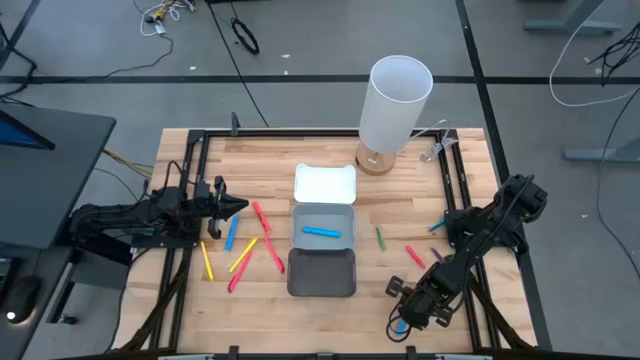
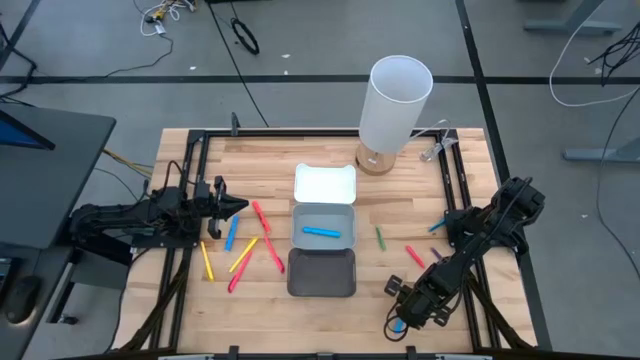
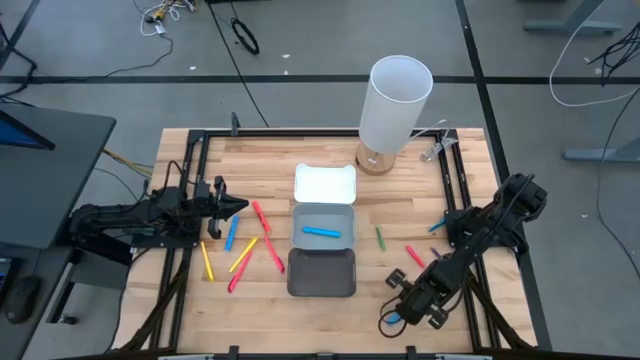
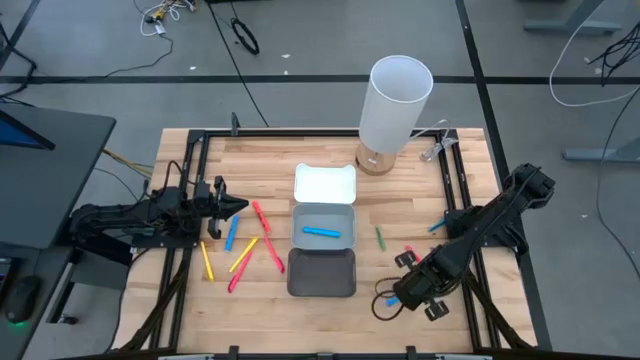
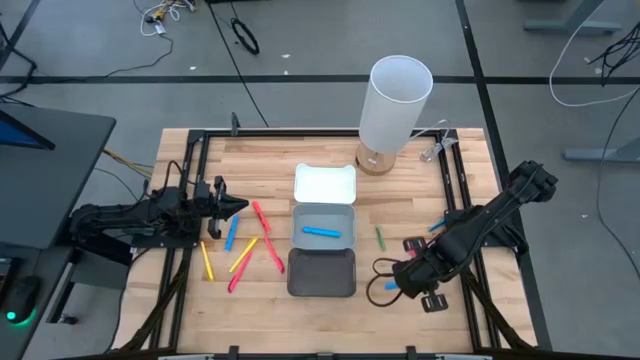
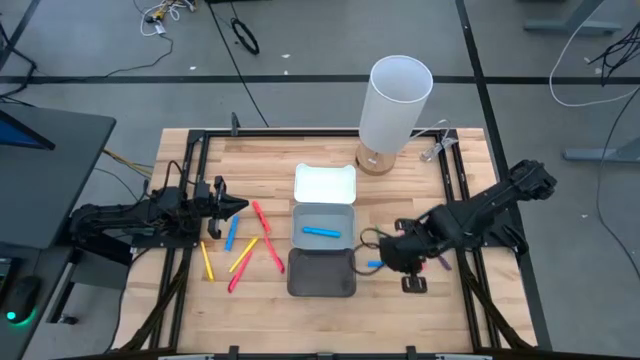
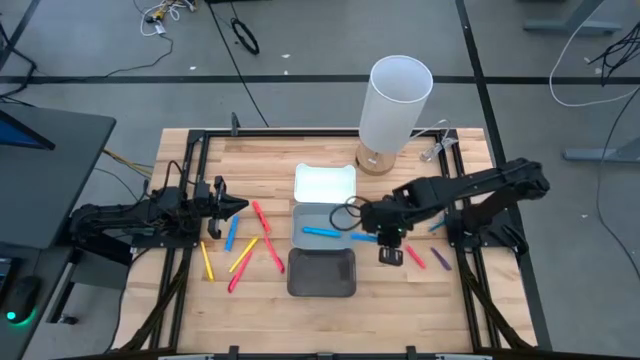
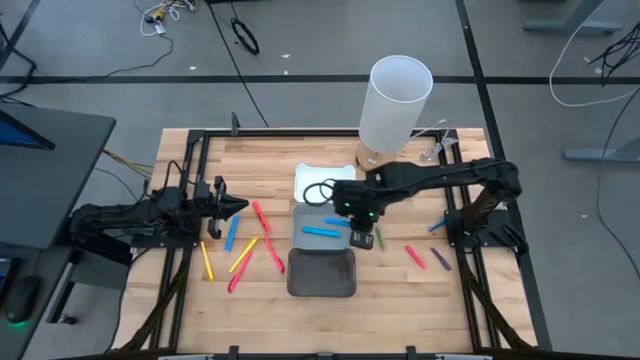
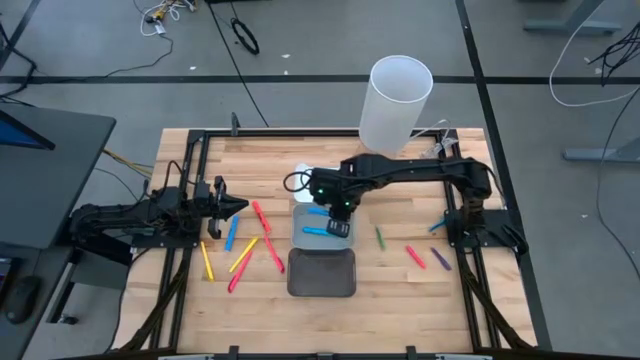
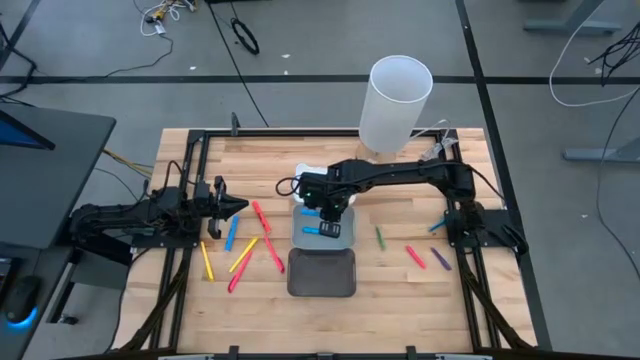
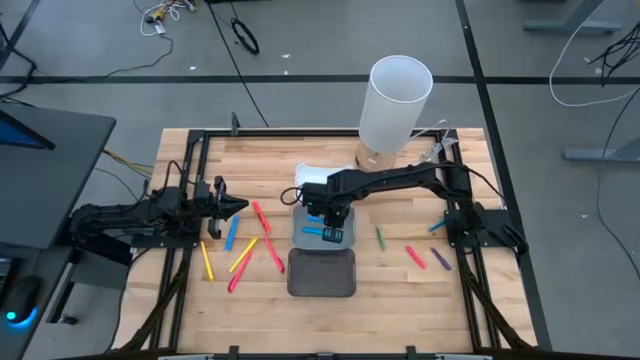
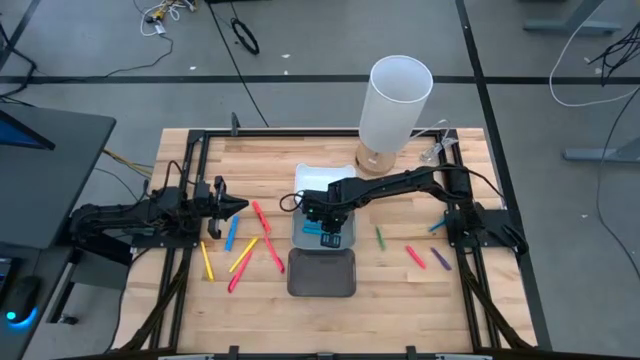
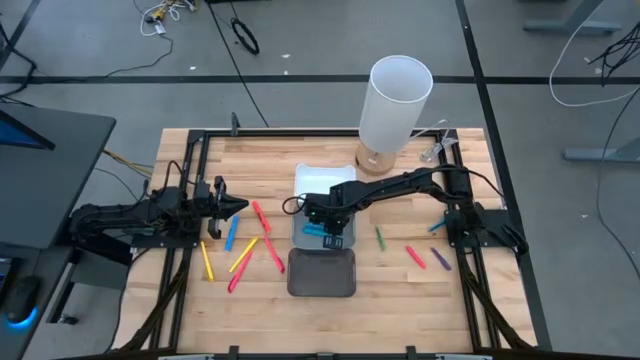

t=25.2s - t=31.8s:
Task: Pick & Place Markers
Put the light blue highlighter pen into the gray bin

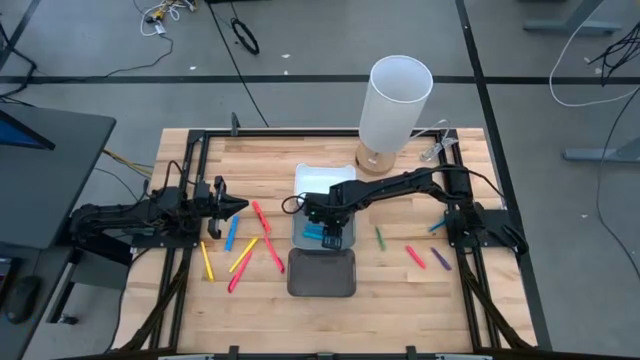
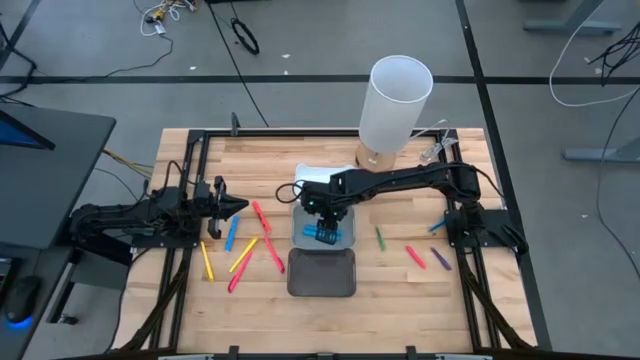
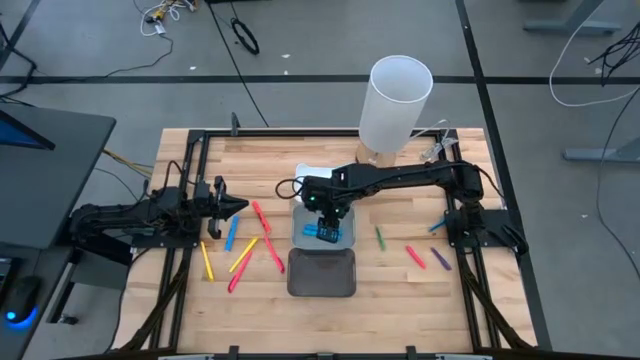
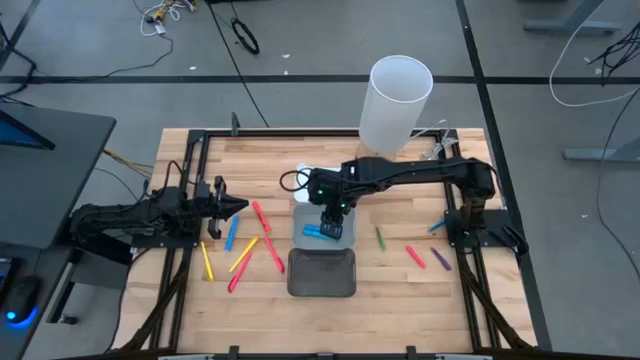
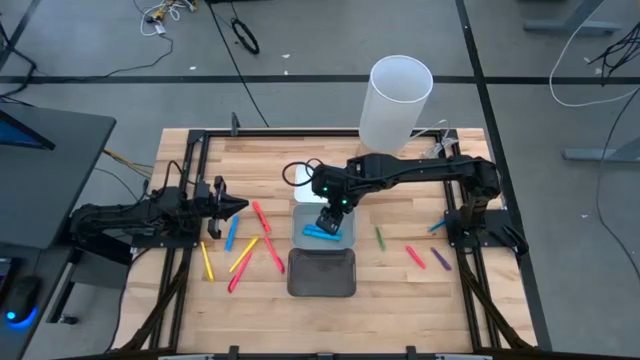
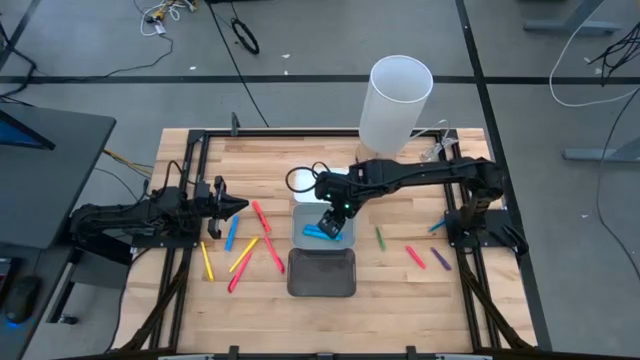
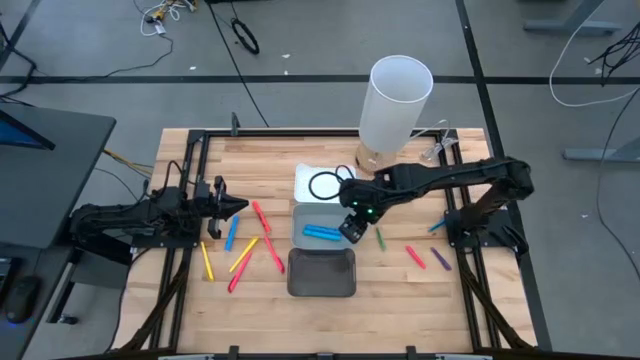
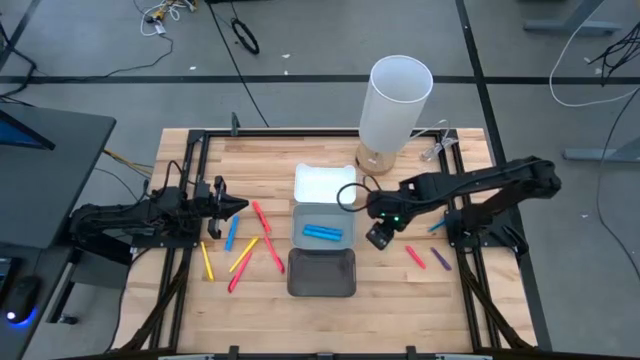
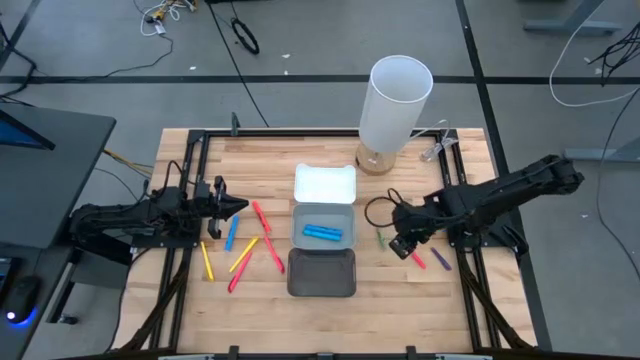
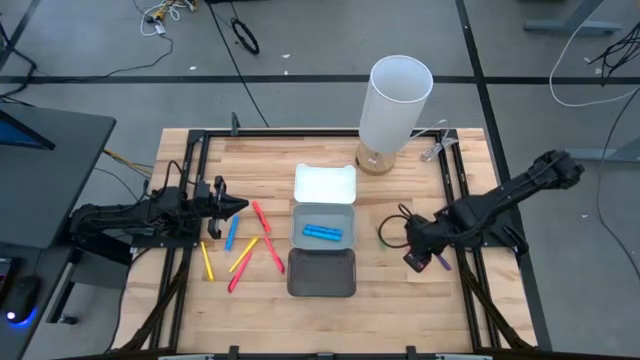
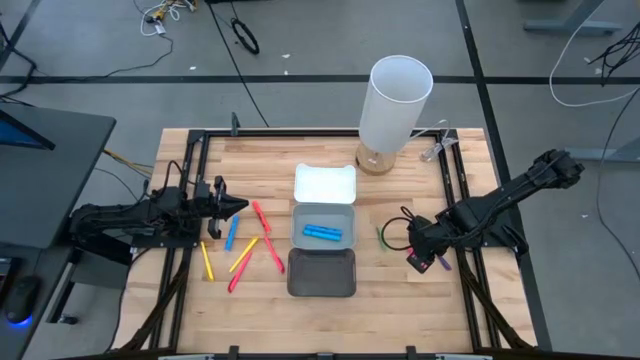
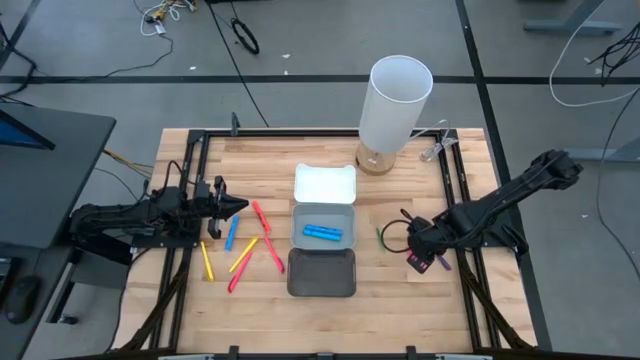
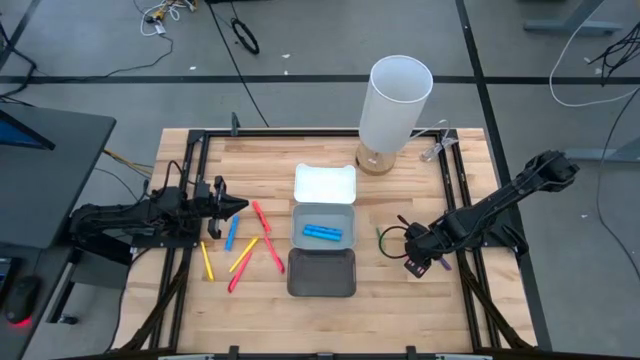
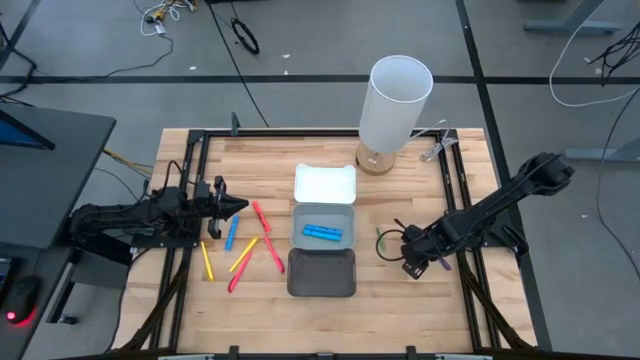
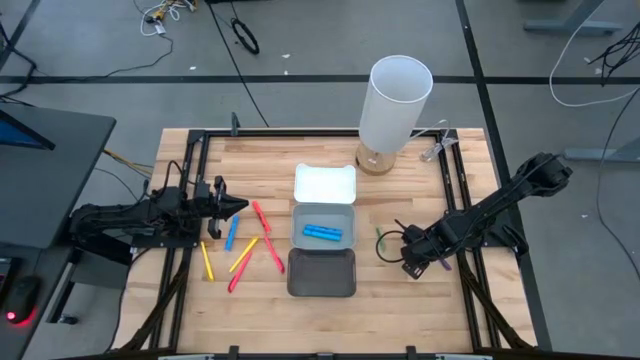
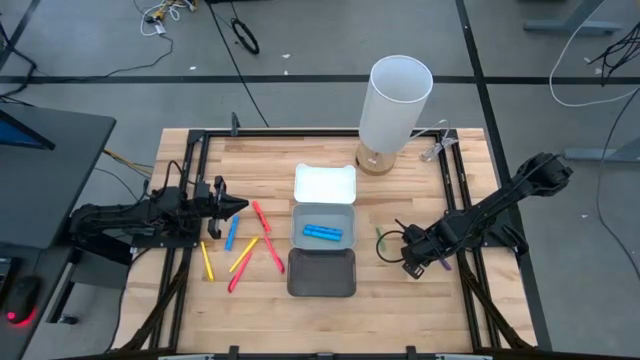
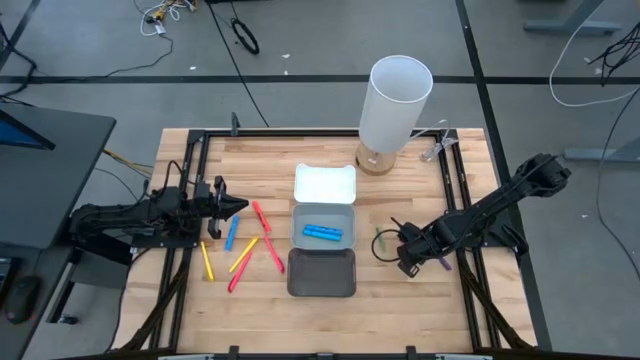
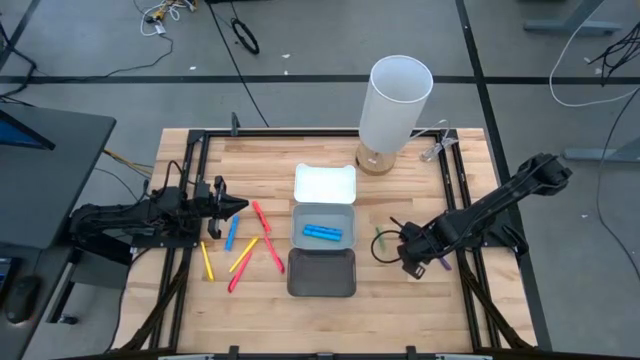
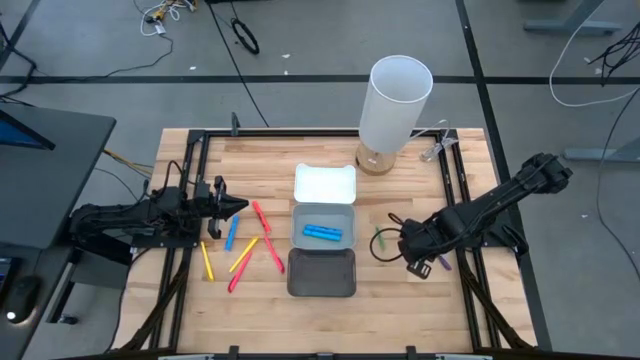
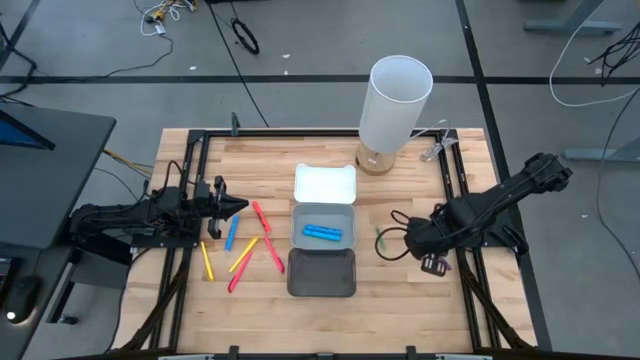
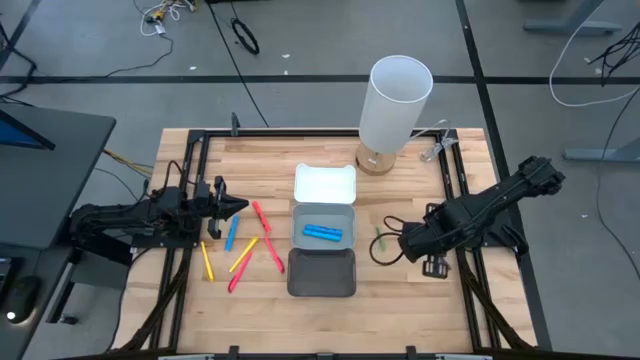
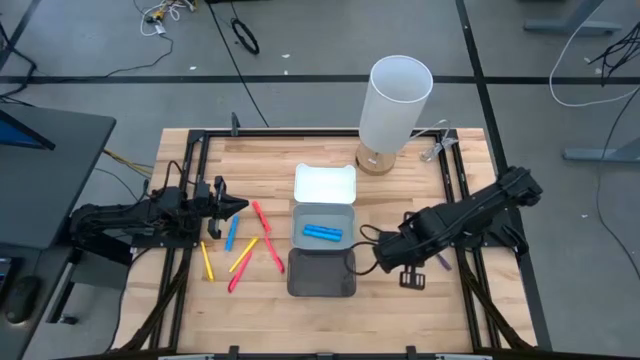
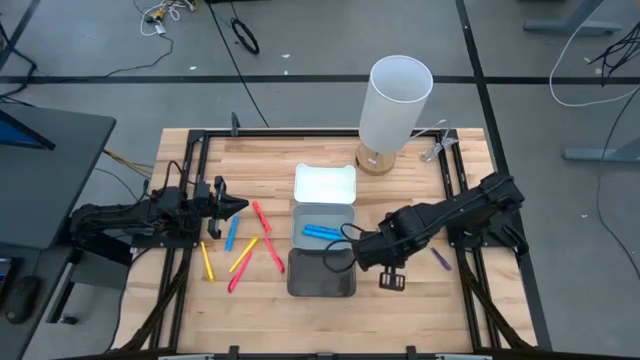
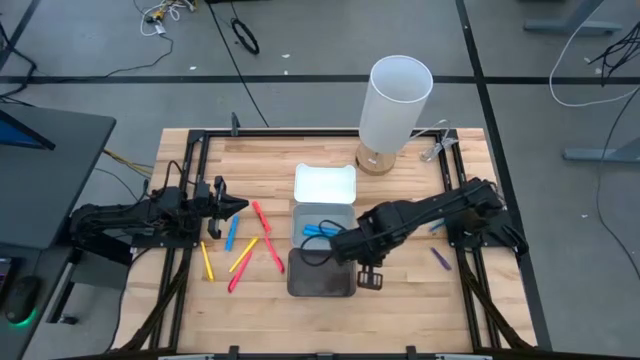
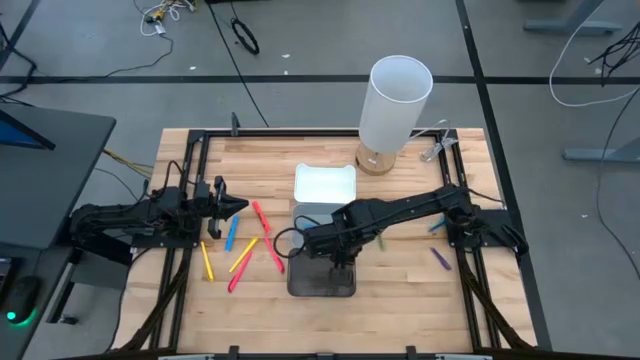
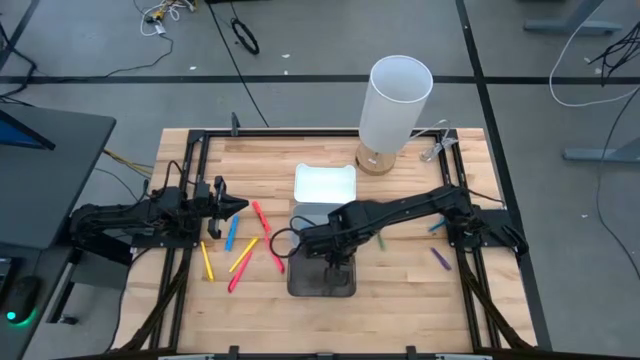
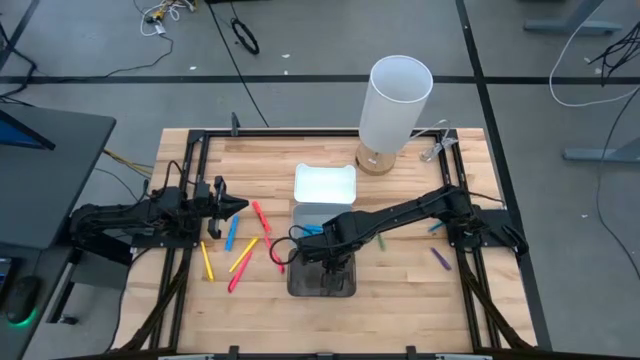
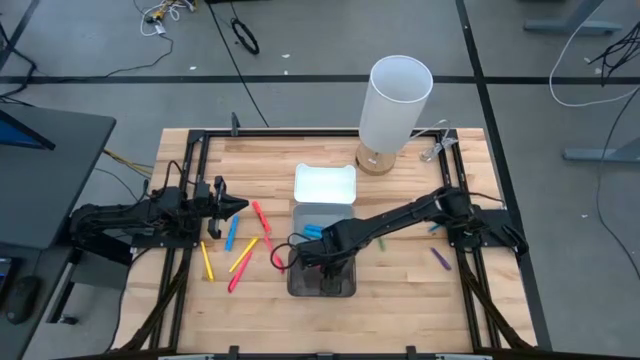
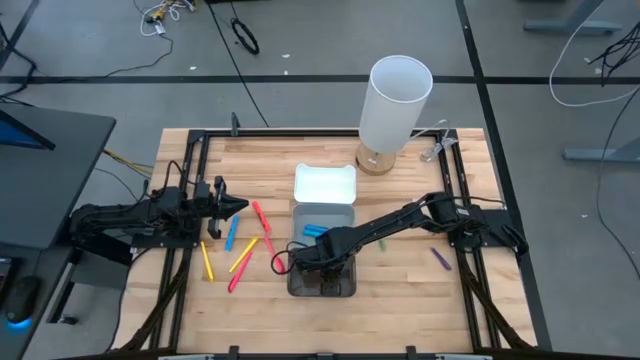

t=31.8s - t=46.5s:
Put the pink pen into the black transparent bin
